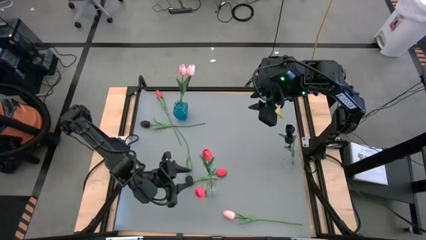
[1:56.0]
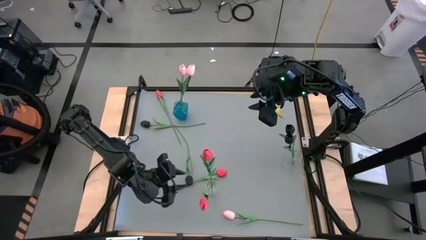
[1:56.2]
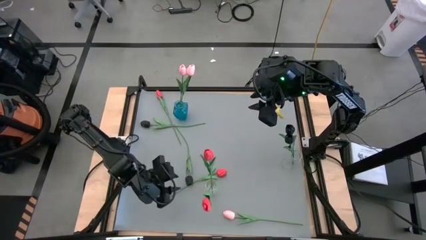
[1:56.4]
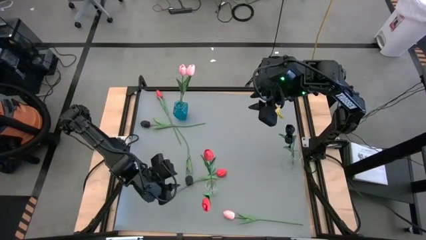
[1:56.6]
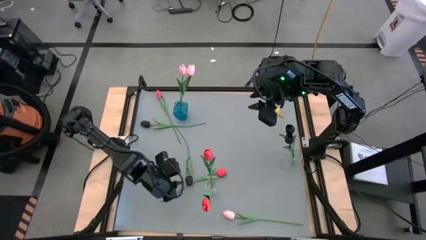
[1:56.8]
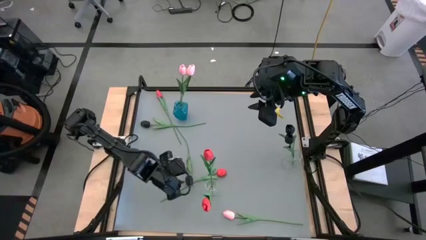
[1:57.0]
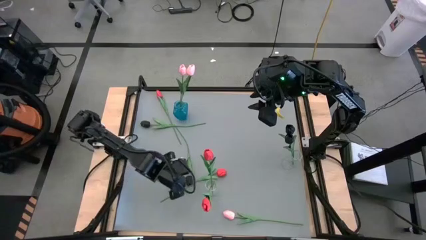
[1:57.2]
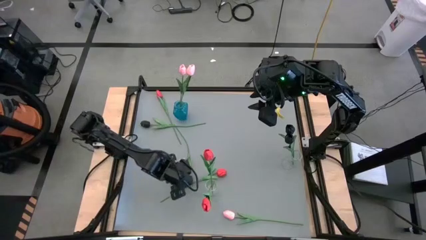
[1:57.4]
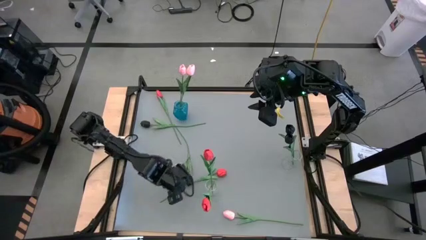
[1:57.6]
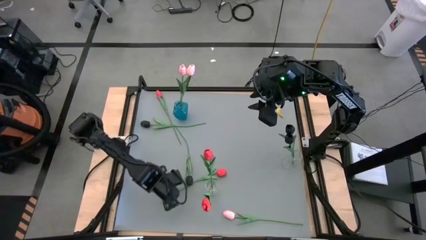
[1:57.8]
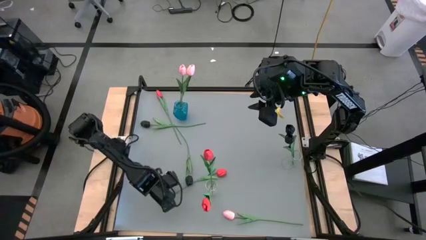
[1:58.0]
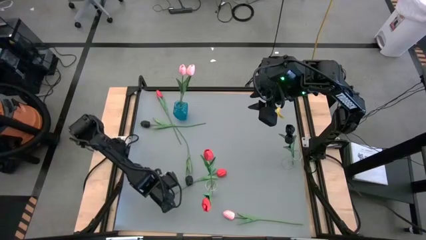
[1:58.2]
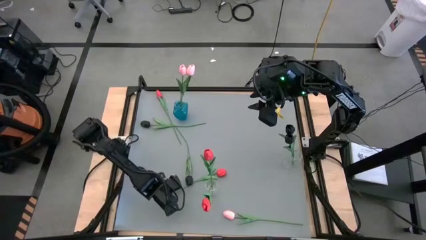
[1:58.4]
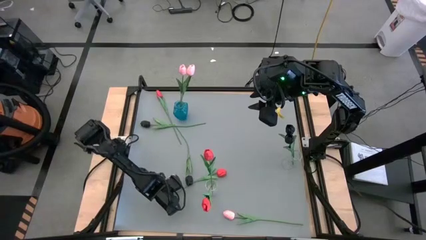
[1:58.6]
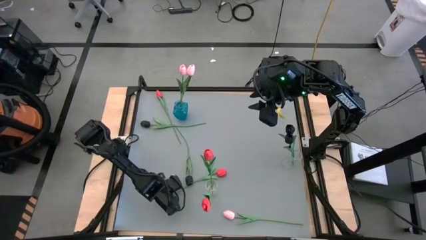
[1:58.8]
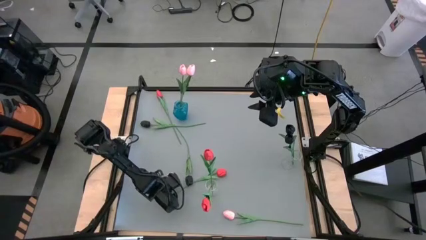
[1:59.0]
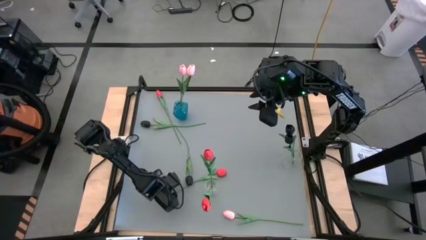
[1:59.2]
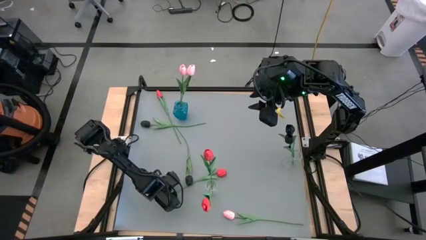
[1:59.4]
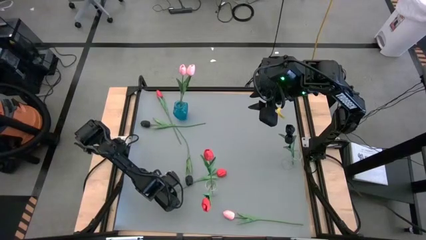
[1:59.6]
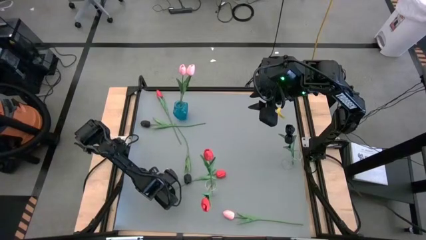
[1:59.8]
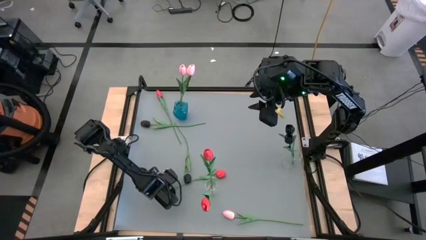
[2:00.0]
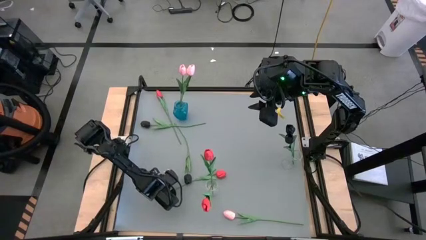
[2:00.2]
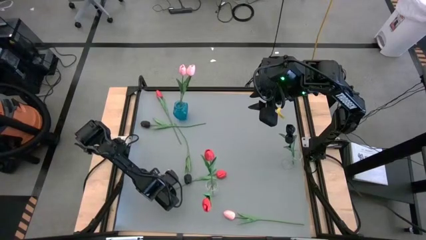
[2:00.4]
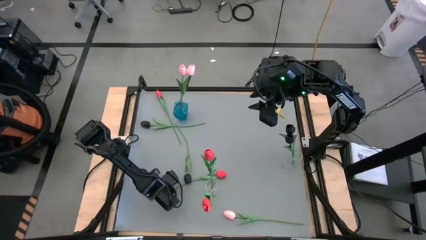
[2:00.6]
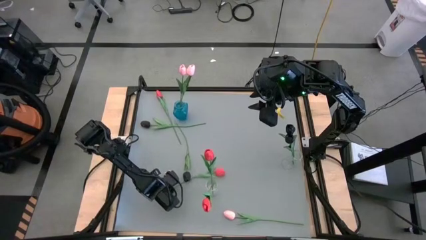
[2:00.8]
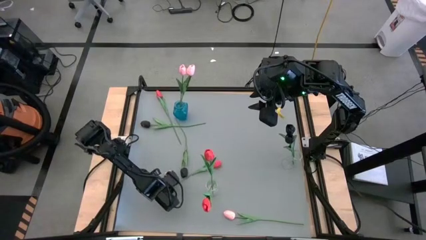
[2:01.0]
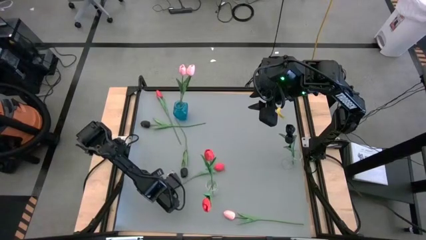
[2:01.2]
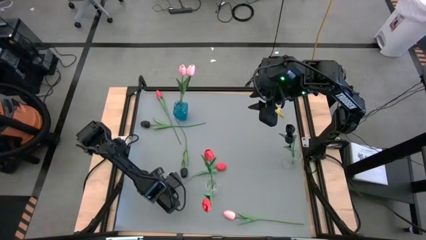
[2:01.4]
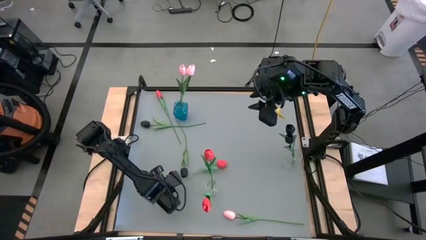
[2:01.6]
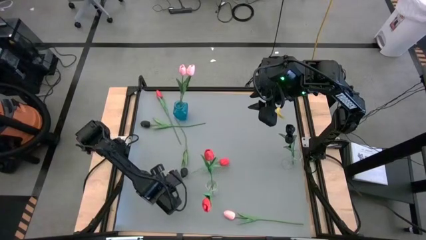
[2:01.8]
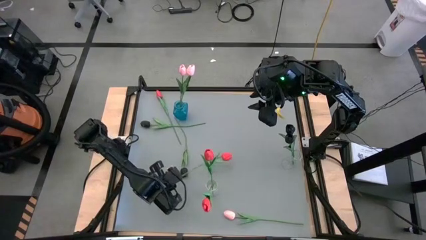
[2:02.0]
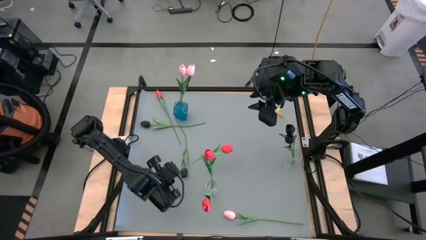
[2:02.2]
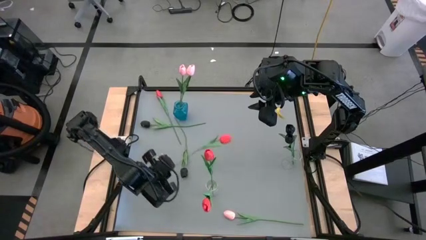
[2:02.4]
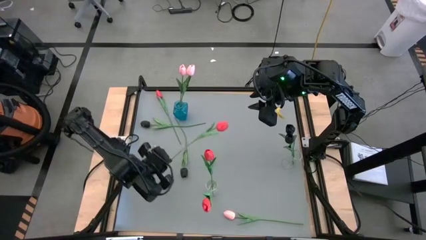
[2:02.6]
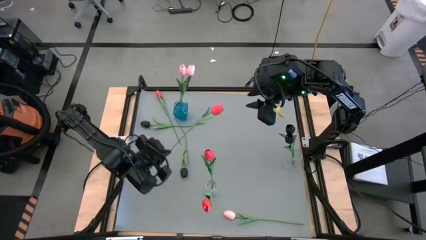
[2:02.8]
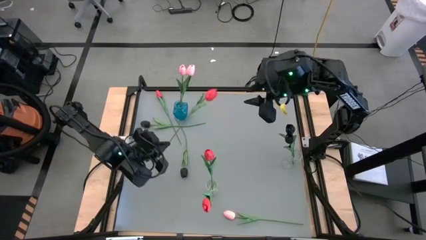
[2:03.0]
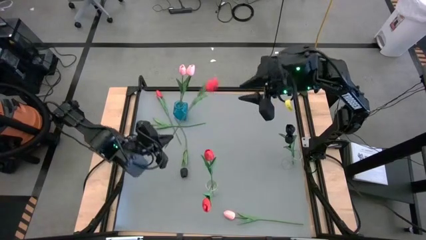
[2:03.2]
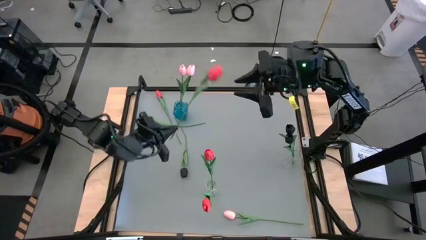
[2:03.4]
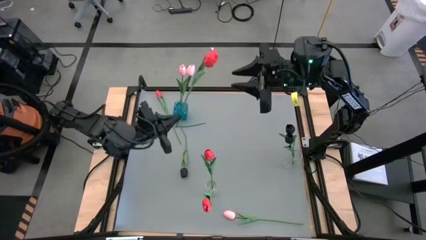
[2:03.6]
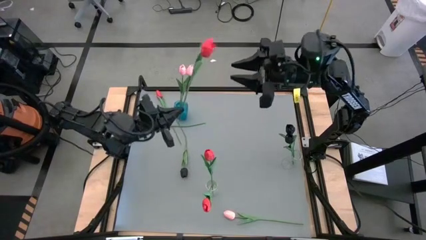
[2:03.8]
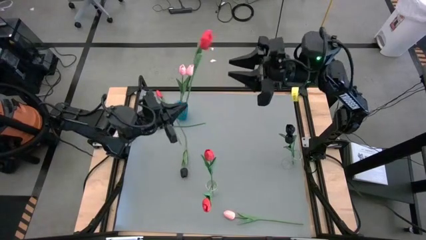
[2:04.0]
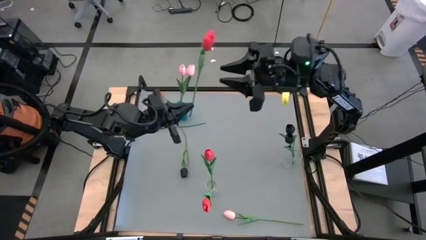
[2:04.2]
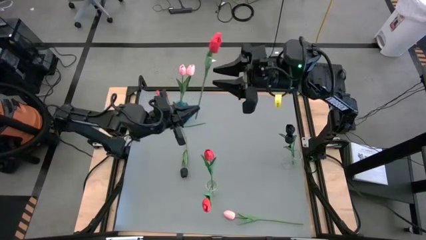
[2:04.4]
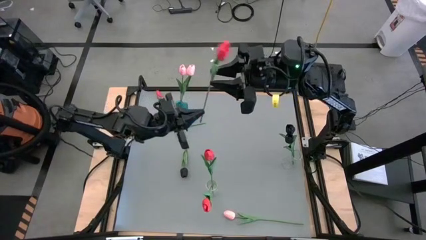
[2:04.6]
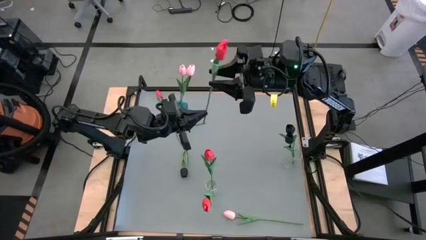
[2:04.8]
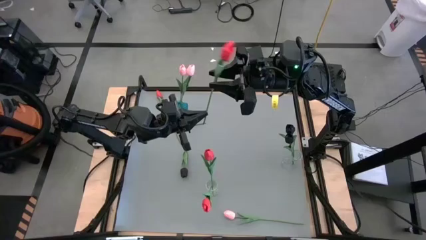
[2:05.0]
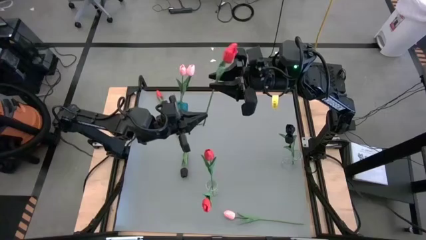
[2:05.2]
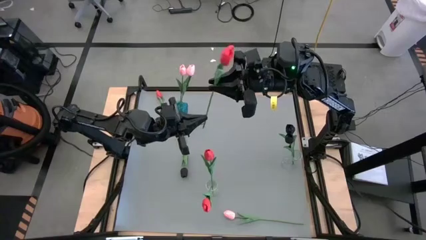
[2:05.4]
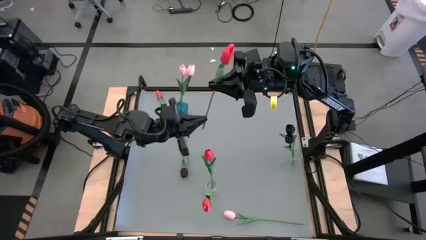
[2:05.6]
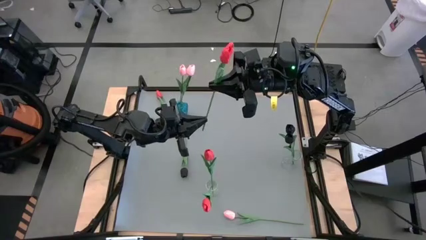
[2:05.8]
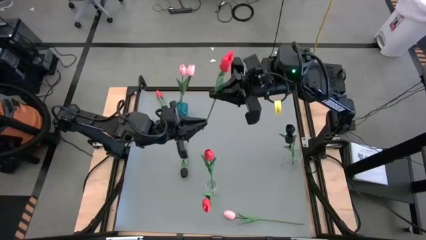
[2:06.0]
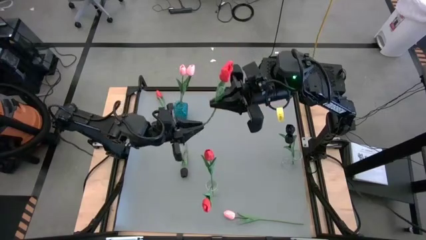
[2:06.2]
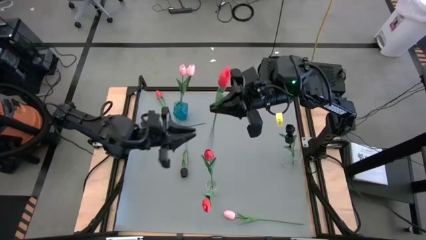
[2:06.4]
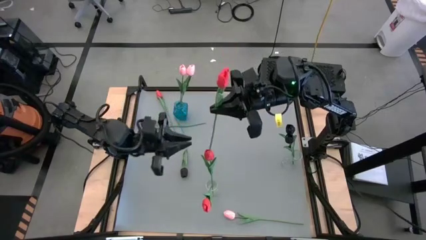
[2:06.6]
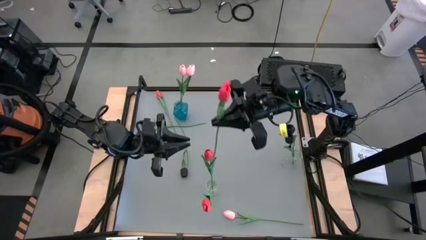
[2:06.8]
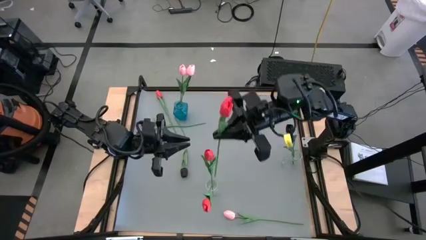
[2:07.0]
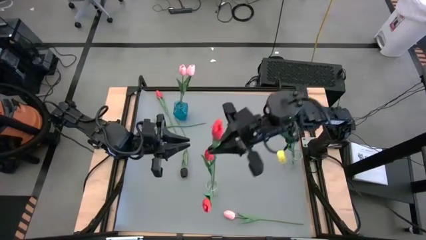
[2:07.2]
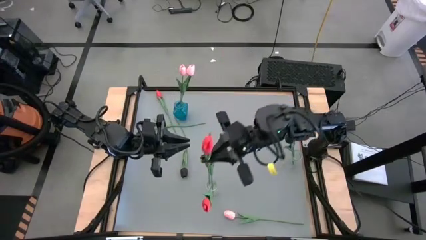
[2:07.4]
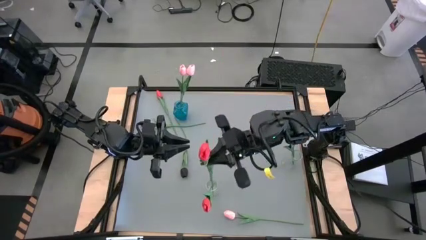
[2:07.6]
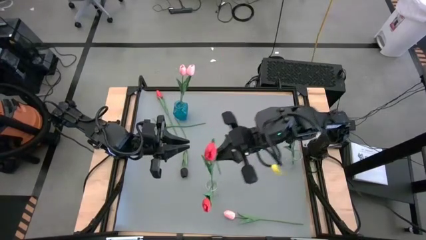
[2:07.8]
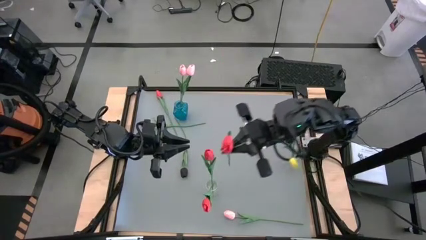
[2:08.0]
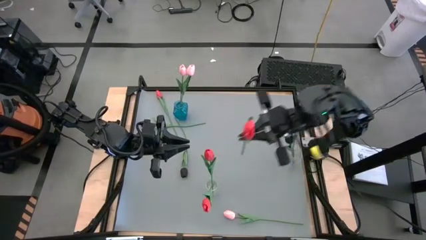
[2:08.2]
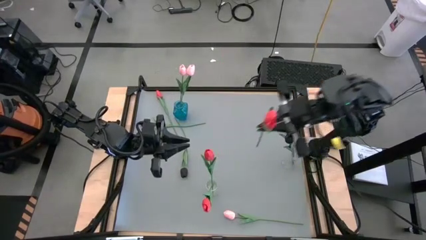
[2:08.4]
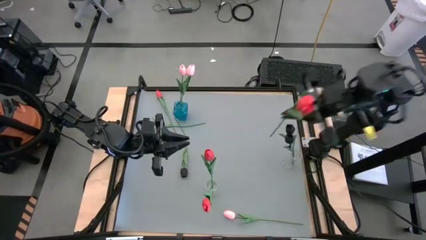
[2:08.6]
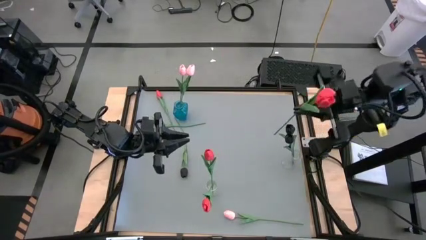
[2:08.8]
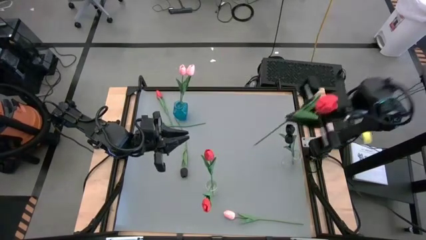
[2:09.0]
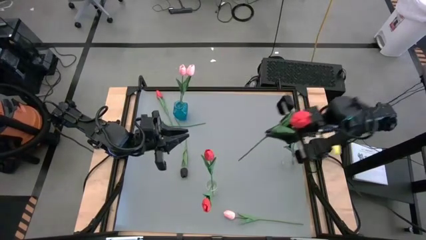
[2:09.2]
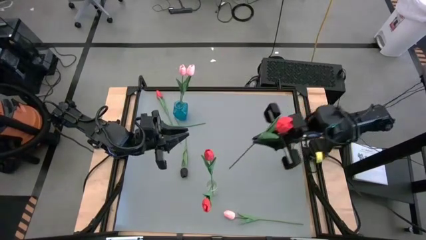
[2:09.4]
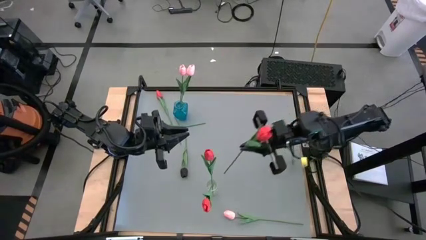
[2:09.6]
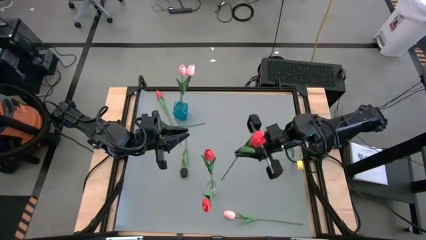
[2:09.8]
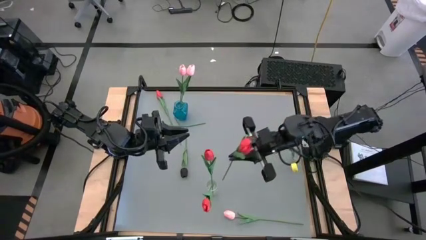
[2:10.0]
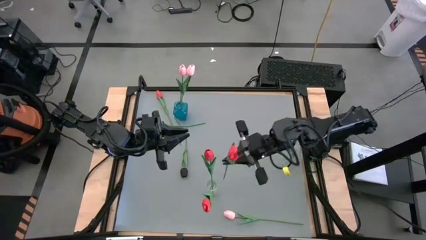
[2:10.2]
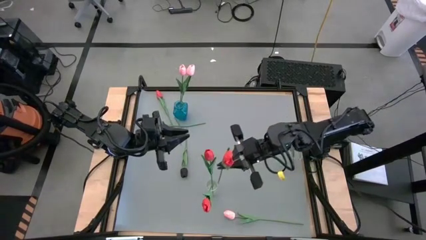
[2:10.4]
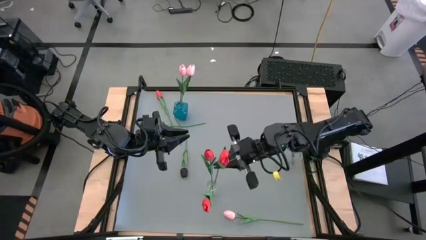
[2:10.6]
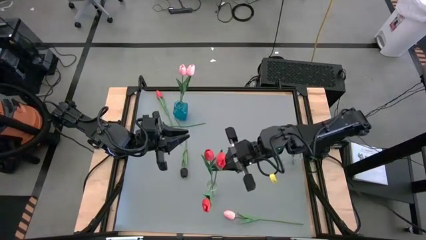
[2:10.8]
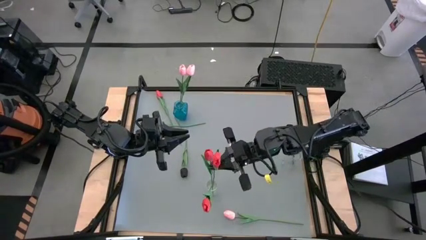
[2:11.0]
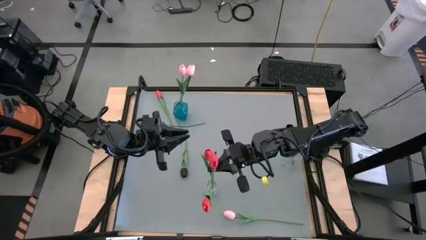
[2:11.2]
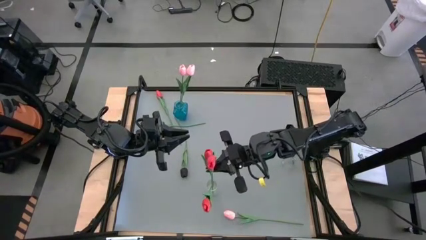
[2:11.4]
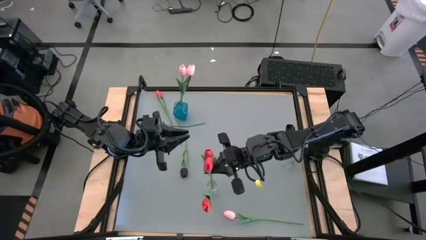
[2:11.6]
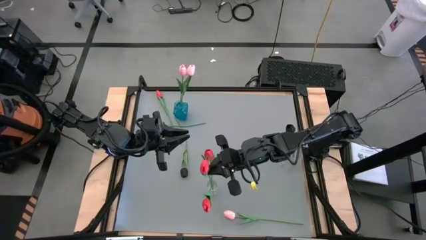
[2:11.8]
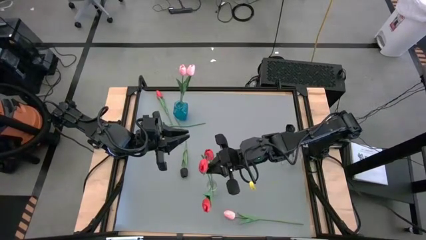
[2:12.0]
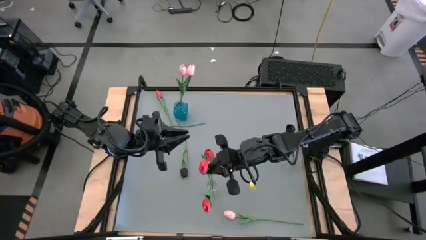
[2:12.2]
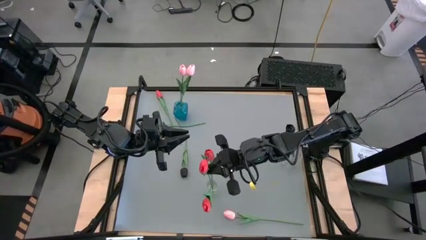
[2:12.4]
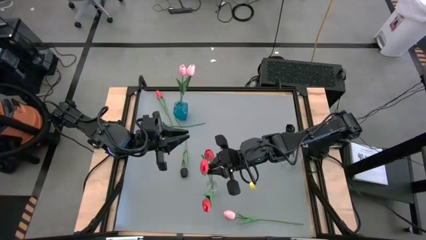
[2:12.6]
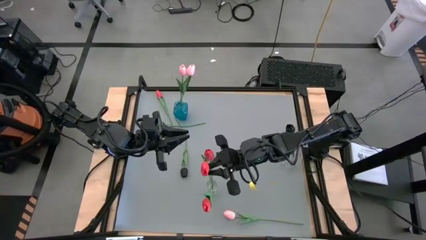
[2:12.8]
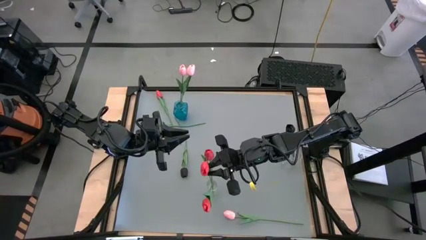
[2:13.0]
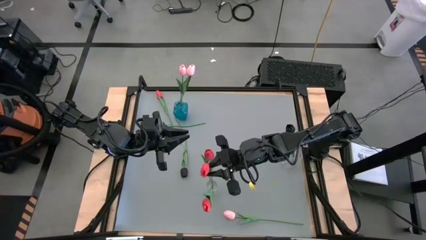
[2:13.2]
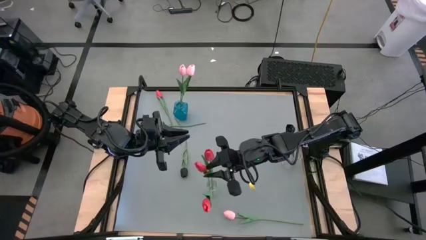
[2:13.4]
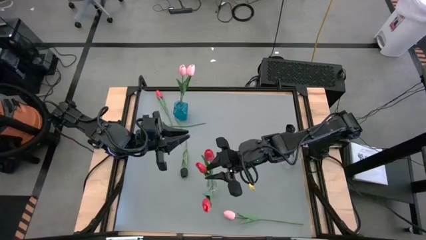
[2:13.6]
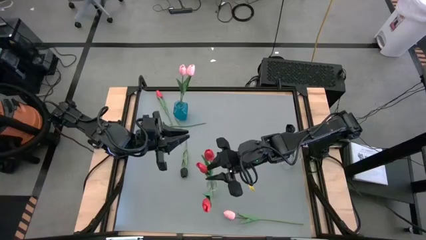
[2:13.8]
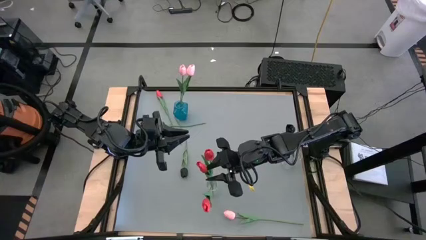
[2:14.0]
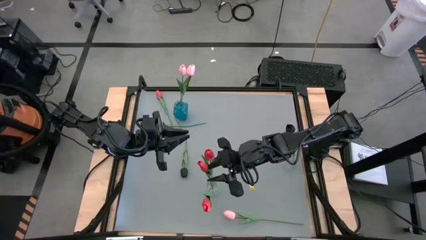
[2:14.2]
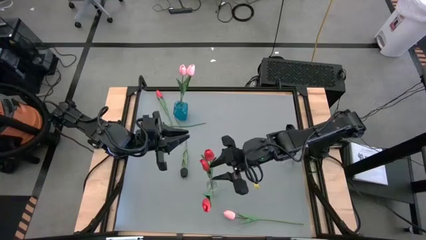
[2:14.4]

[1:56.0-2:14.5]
Task: Sort flowers into vase by color
Put the red flower into the left transparent vase
